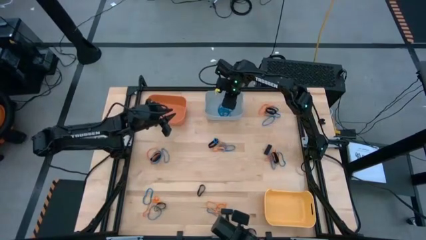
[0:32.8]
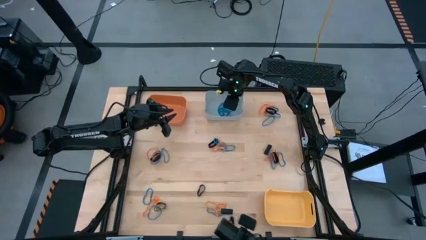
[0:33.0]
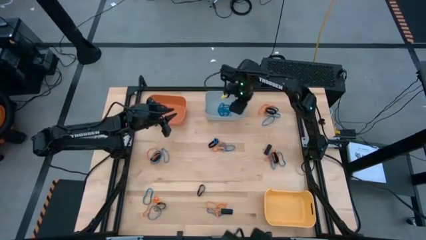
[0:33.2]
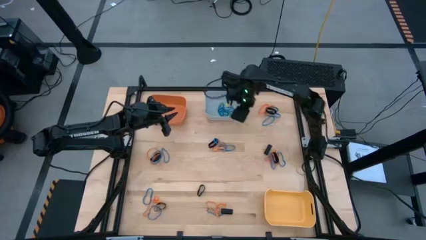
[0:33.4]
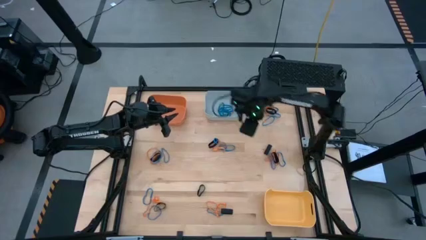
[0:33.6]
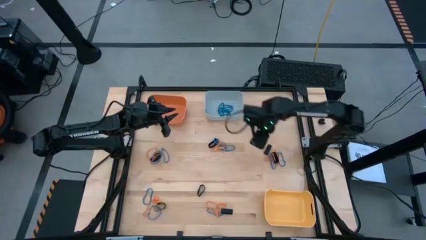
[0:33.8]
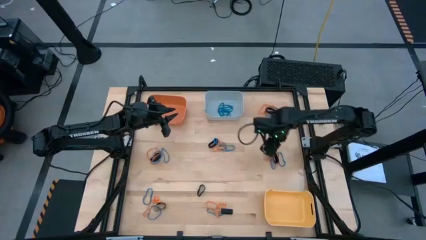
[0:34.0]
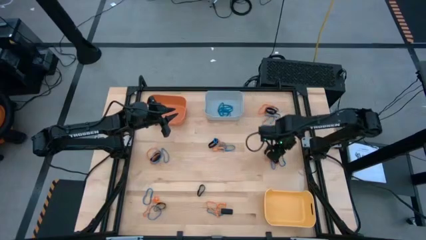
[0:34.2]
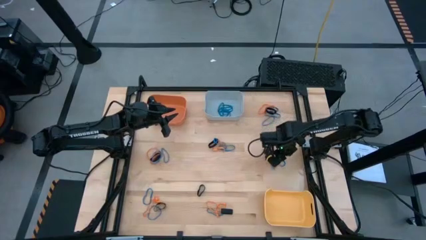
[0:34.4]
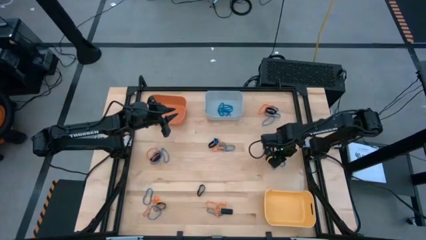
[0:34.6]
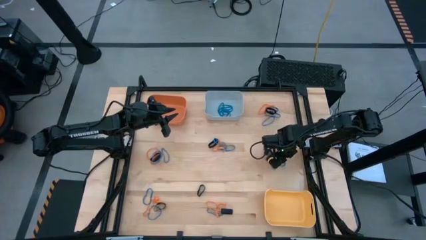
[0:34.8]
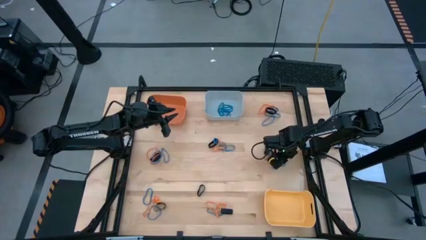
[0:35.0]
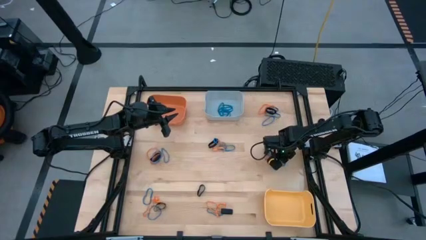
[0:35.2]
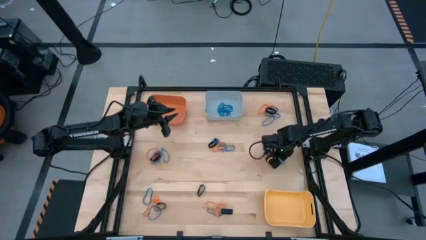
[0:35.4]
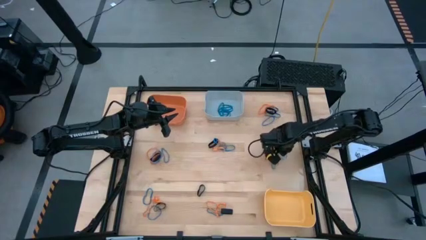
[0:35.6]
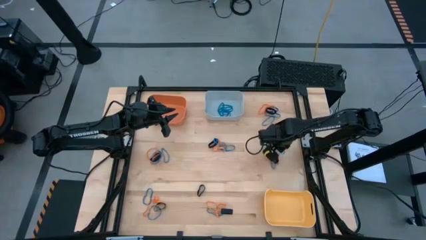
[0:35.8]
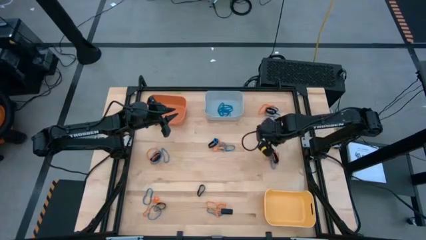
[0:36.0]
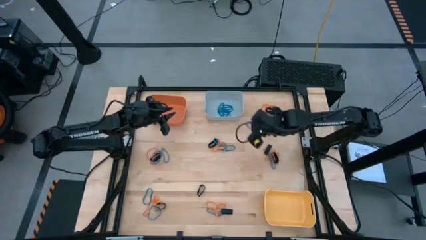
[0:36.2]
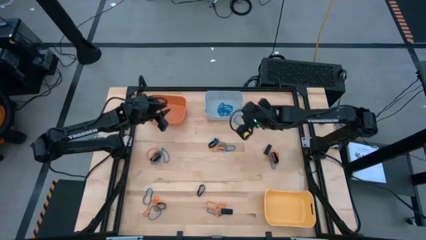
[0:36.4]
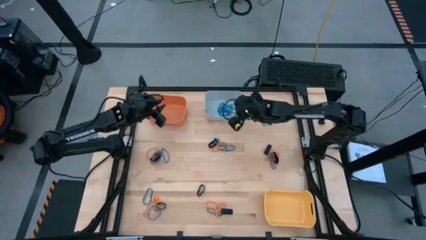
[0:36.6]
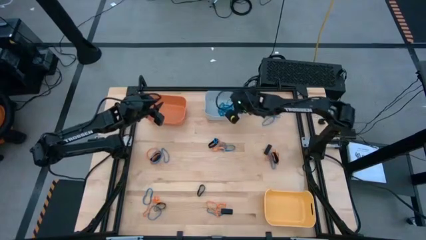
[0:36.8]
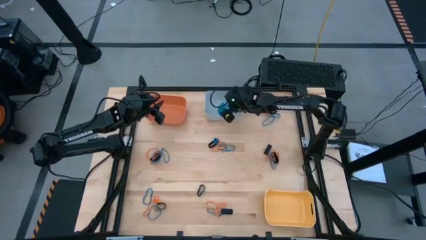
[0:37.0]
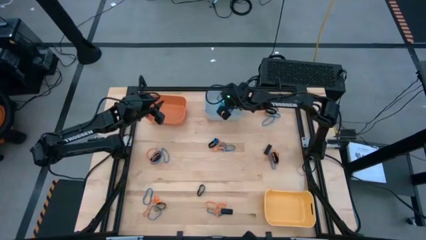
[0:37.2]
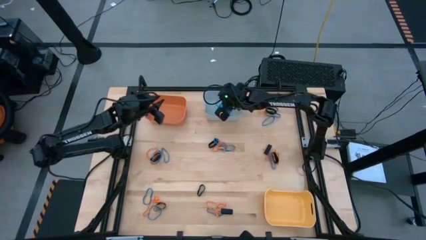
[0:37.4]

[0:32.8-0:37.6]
Task: Sort rubber bands into baskets
Put the blue rubberband into the gray bin

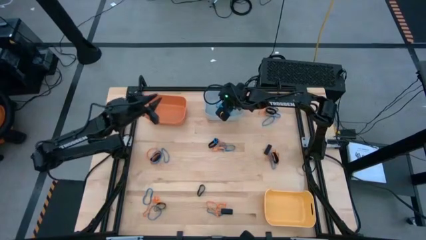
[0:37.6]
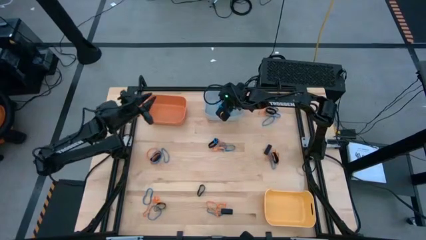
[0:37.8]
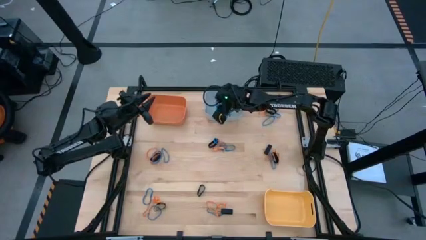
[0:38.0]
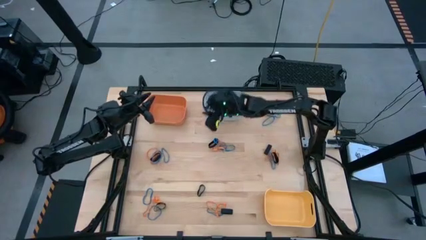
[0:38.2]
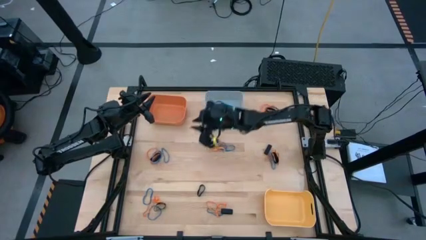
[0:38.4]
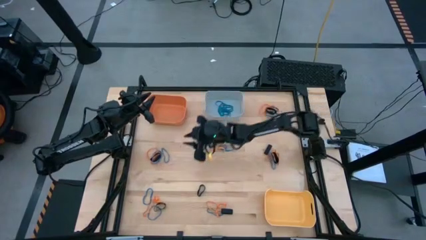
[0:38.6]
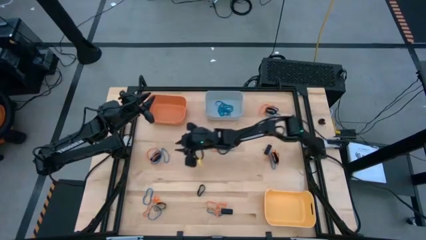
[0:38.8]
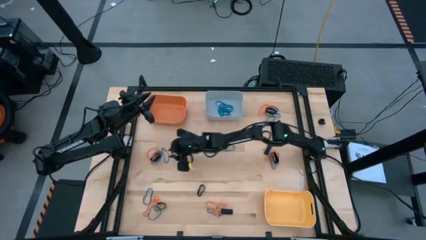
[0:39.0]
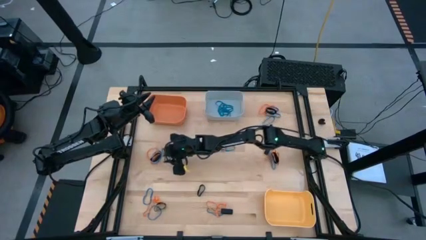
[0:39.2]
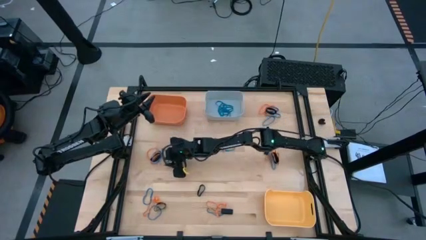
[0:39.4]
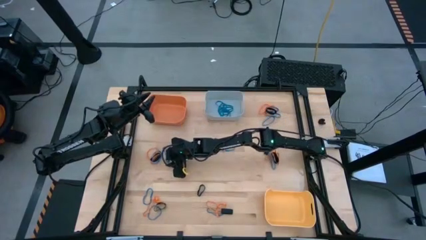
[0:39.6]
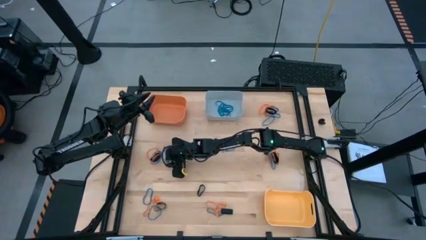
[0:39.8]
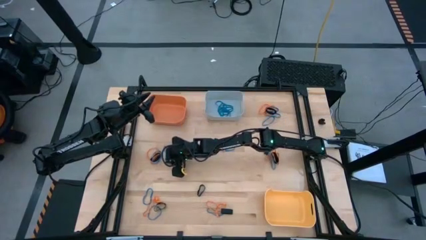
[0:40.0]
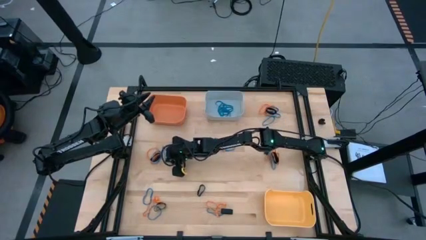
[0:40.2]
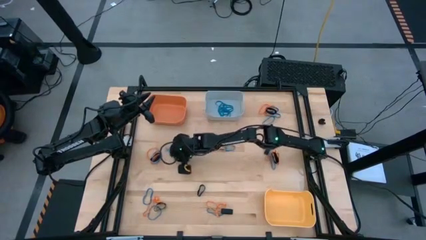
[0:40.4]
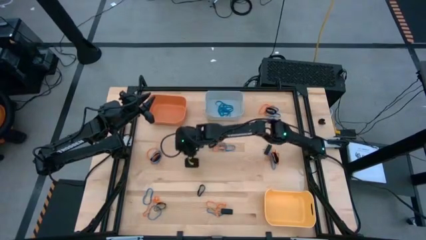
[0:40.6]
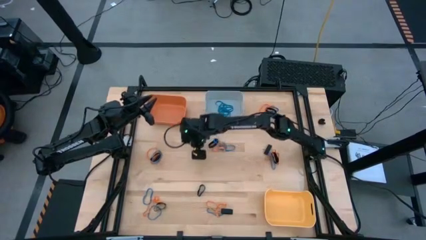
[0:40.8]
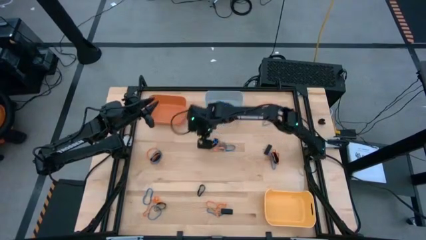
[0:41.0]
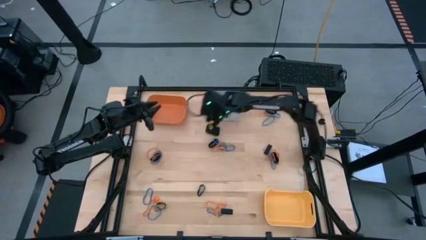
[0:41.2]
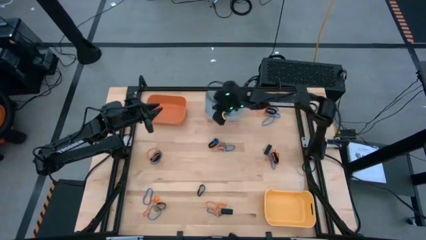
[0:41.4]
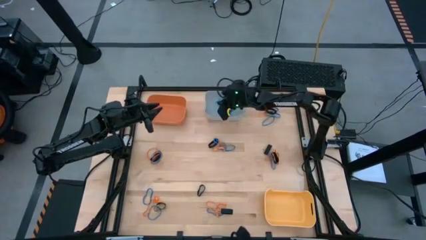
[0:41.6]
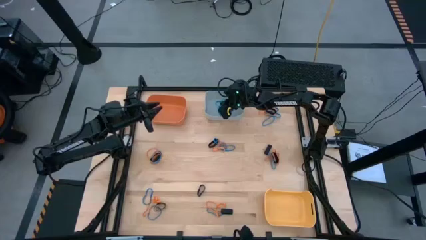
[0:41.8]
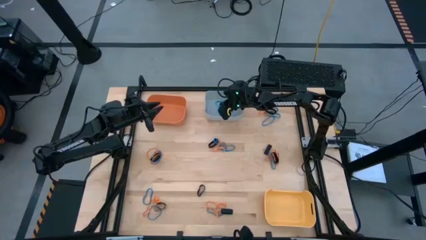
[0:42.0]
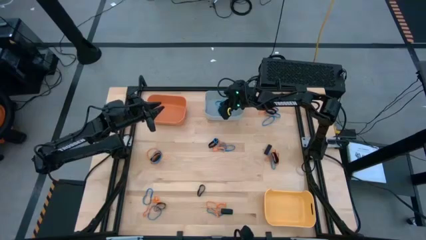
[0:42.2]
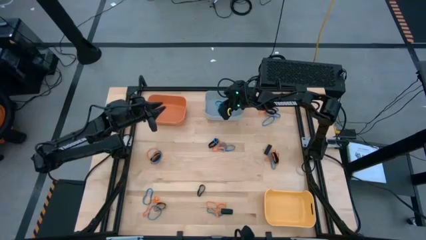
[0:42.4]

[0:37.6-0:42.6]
Put the blue rubberband into the gray bin

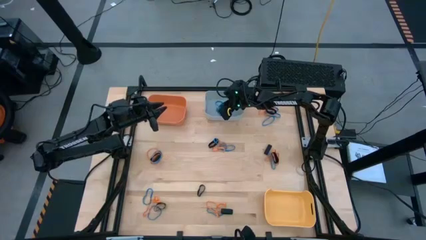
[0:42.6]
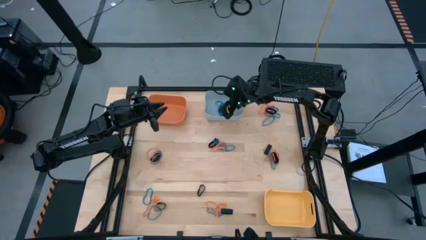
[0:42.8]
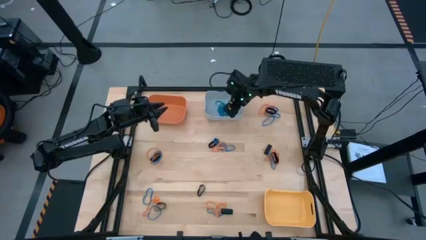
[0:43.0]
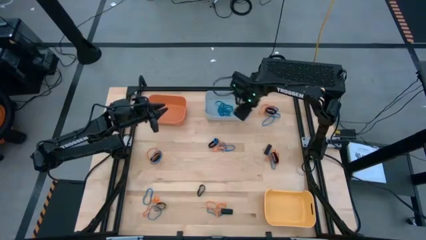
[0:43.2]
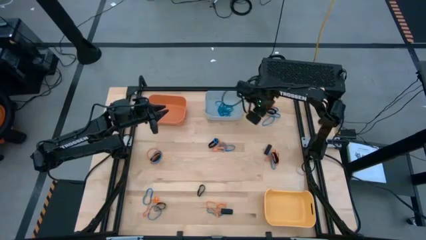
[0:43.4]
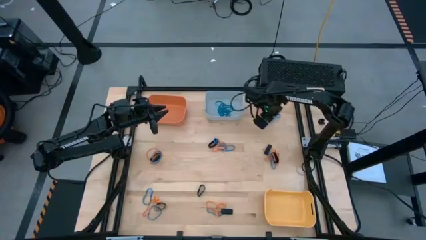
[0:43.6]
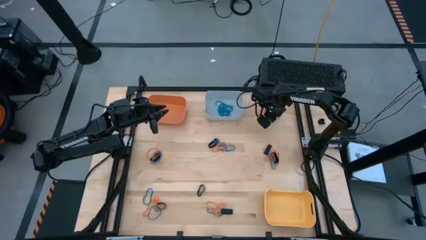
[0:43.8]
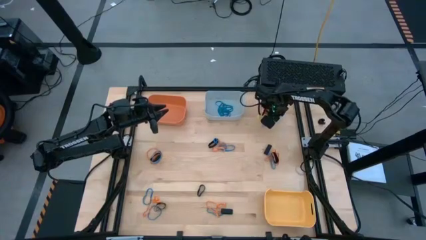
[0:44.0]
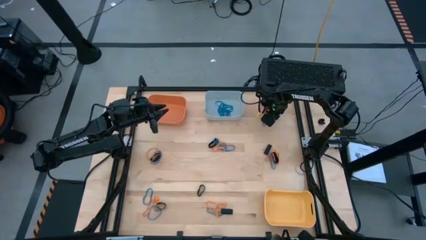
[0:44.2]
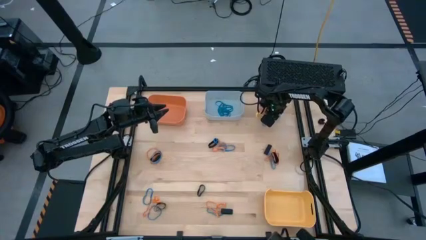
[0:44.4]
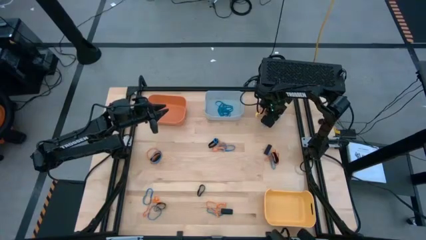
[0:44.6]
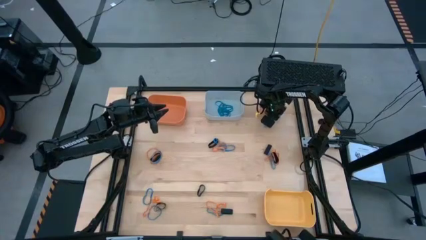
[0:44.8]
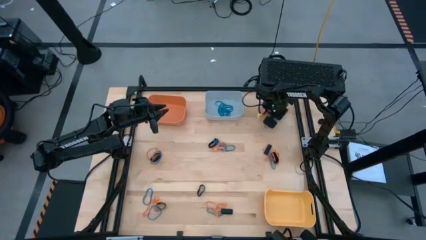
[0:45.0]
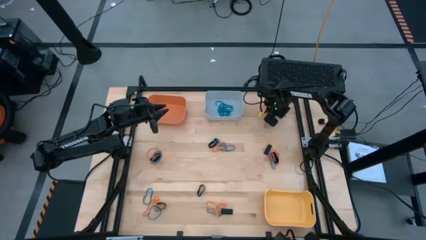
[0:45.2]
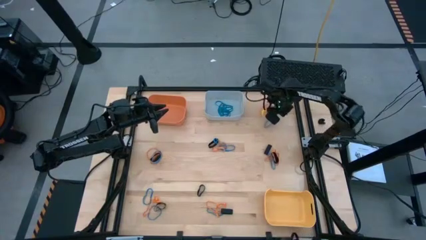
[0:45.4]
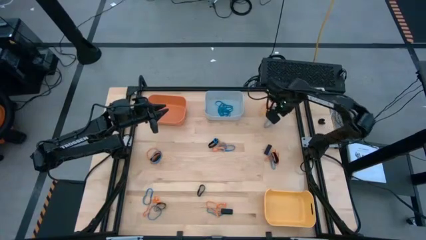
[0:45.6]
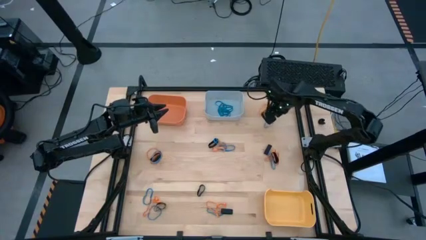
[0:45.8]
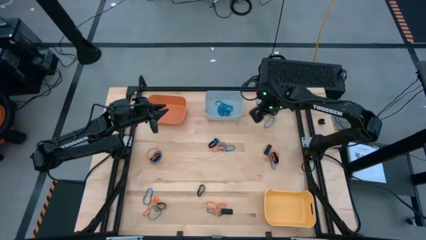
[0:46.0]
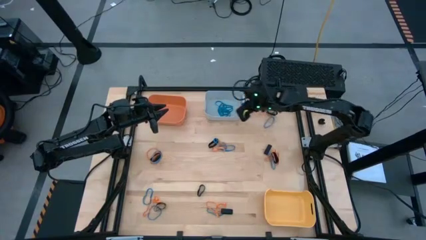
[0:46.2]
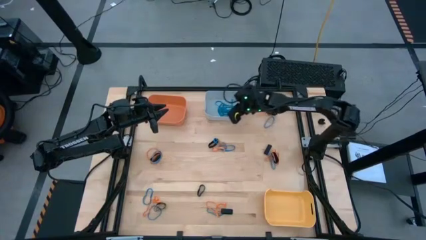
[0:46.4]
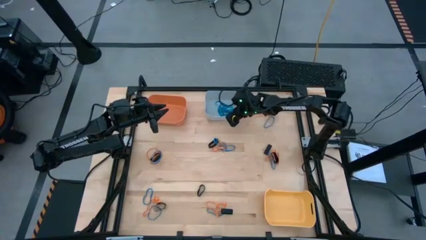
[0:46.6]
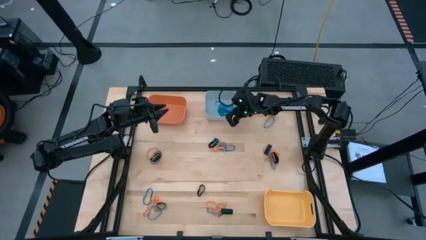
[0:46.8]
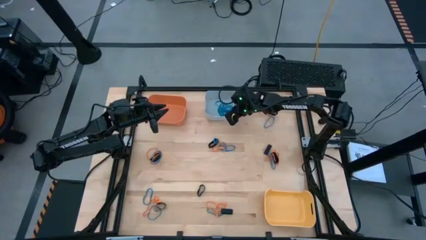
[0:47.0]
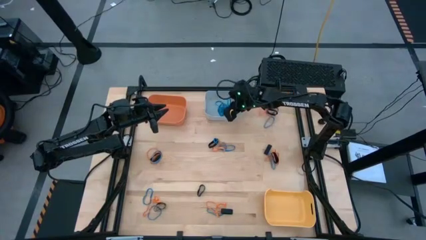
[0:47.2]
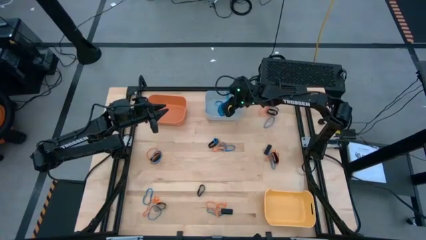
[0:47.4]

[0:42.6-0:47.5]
Put the blue rubberband into the gray bin

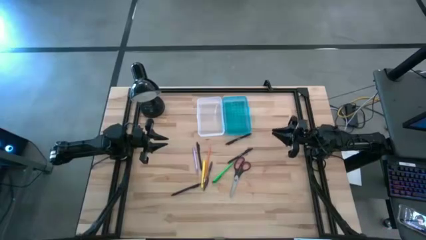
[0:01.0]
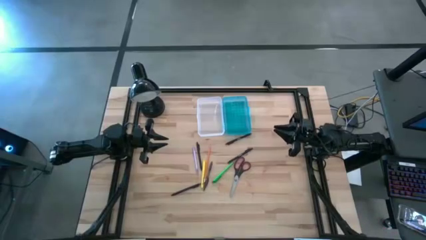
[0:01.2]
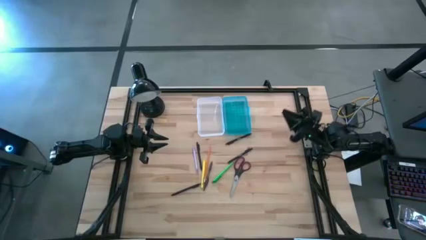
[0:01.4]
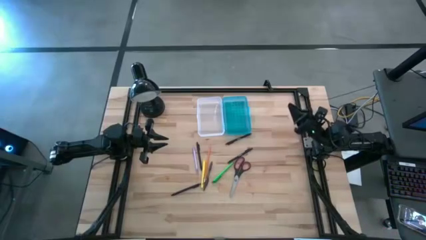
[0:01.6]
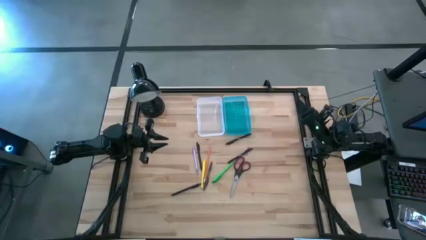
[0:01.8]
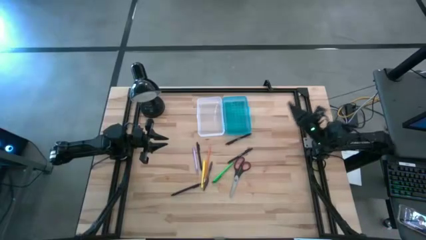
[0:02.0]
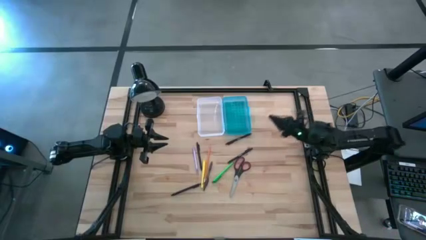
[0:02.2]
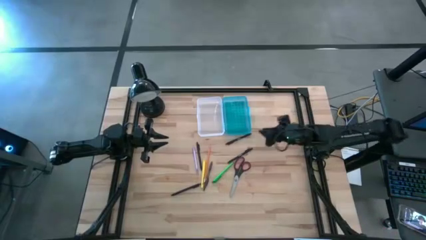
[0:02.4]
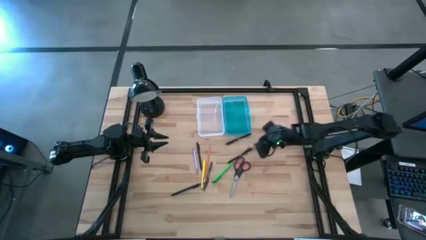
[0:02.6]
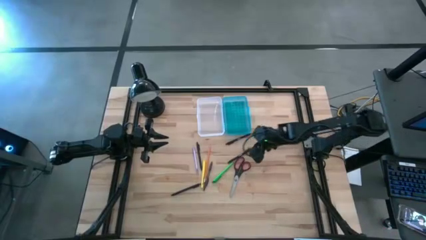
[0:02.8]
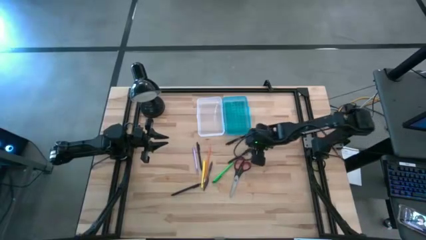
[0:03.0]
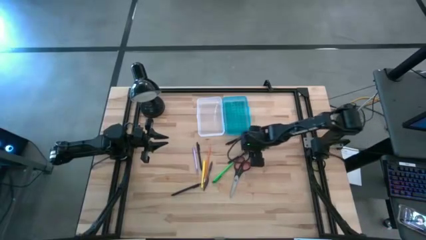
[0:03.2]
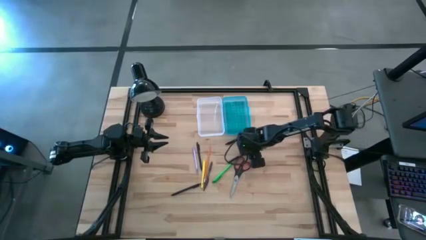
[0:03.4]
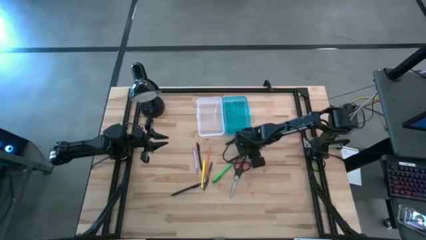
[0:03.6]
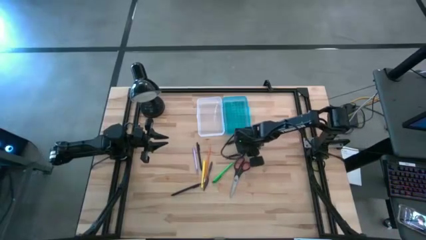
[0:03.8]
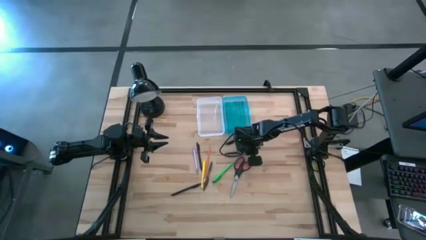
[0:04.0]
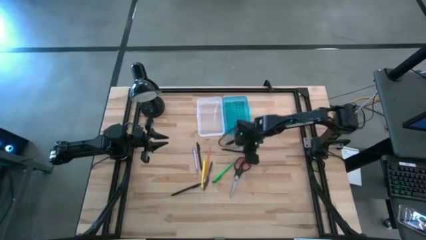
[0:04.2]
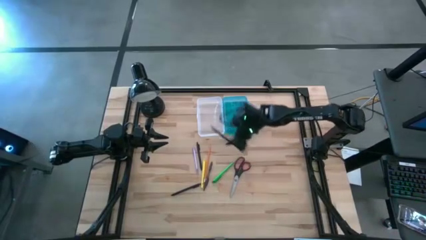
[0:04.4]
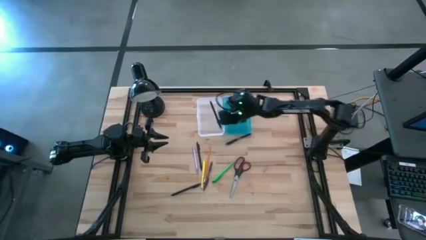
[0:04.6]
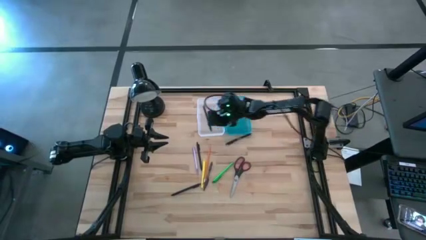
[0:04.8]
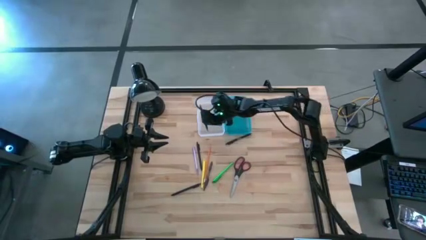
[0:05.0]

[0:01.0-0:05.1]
Task: Pick & place school supplies into a supply box
Put the black pen into the blue supply box
